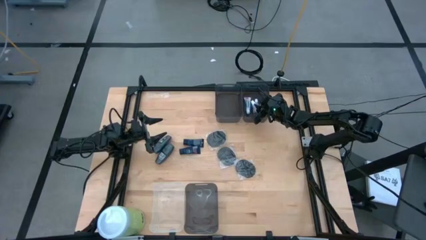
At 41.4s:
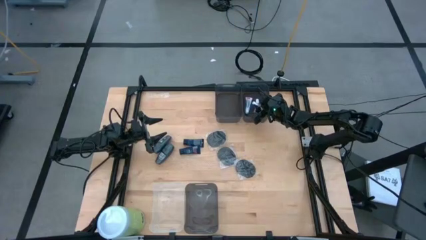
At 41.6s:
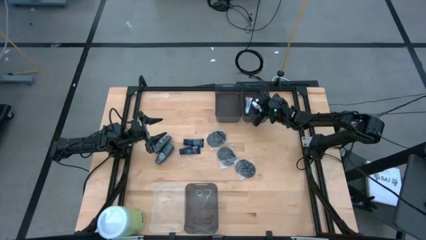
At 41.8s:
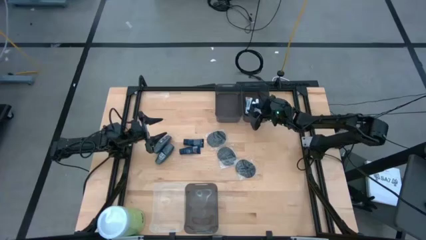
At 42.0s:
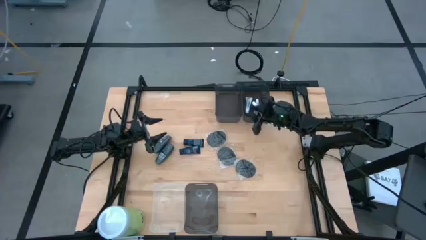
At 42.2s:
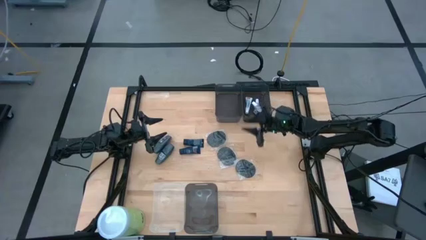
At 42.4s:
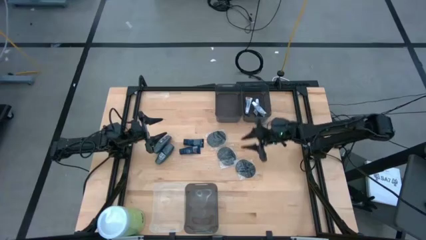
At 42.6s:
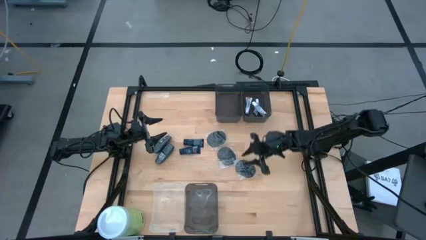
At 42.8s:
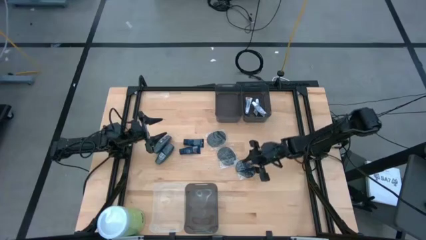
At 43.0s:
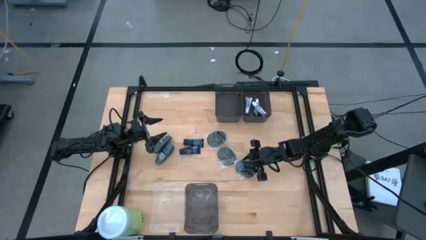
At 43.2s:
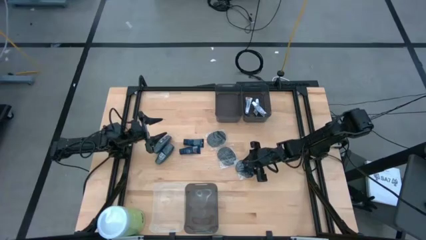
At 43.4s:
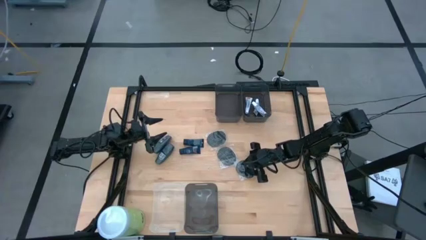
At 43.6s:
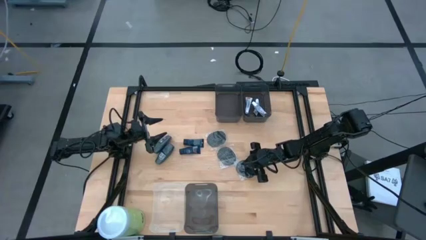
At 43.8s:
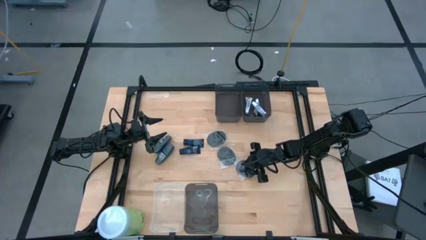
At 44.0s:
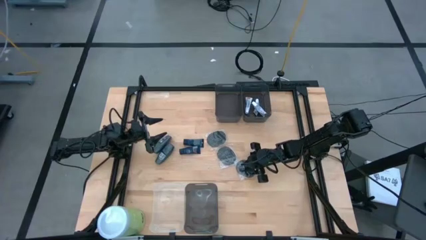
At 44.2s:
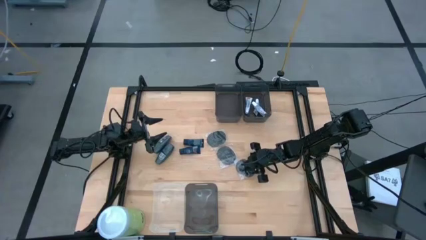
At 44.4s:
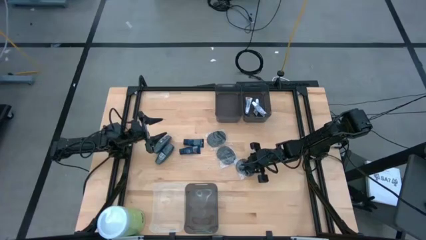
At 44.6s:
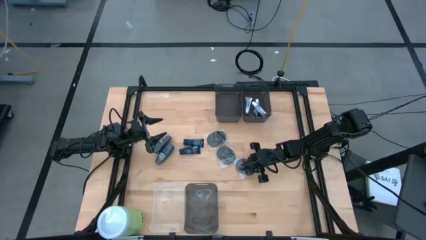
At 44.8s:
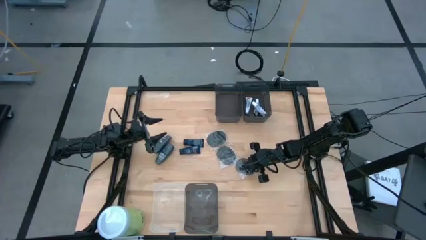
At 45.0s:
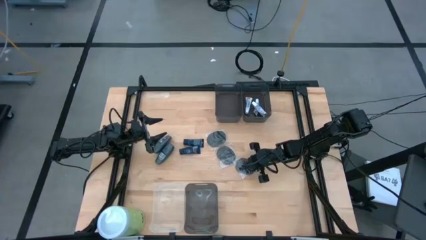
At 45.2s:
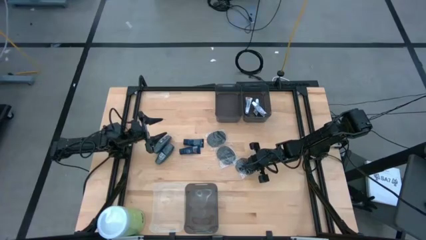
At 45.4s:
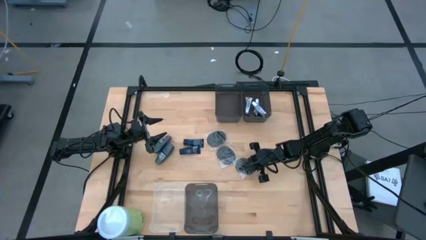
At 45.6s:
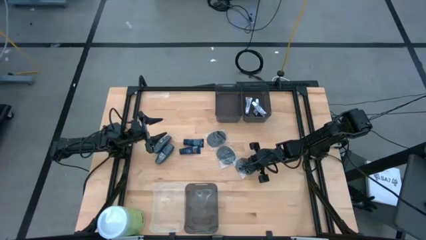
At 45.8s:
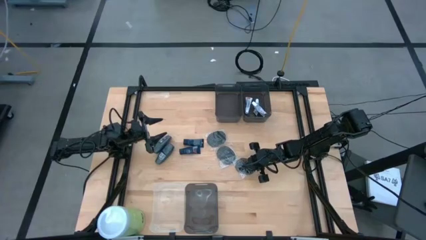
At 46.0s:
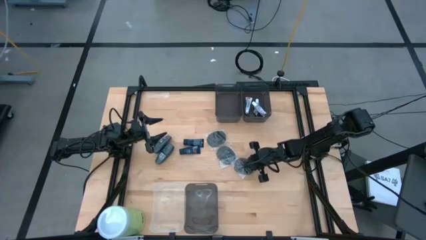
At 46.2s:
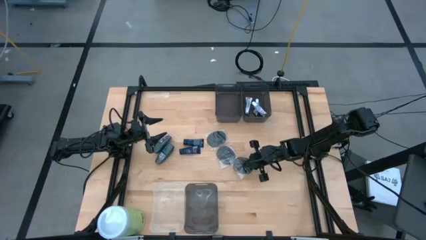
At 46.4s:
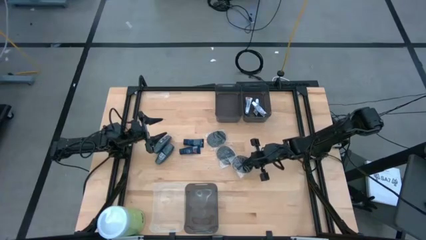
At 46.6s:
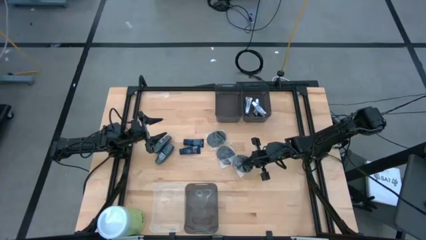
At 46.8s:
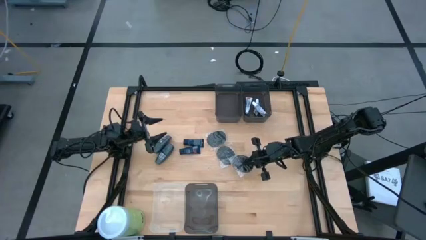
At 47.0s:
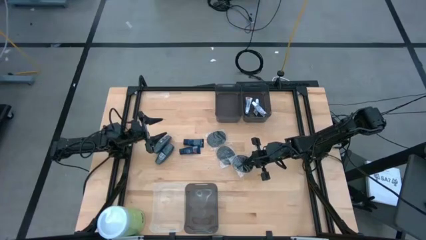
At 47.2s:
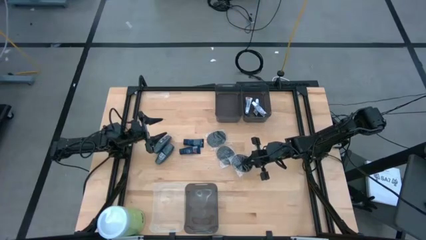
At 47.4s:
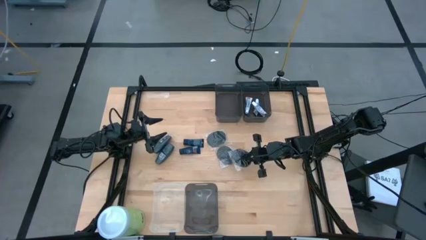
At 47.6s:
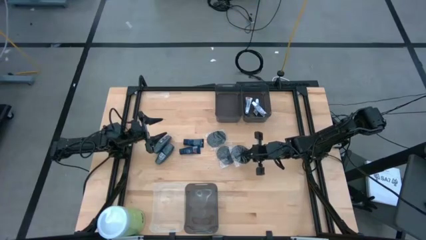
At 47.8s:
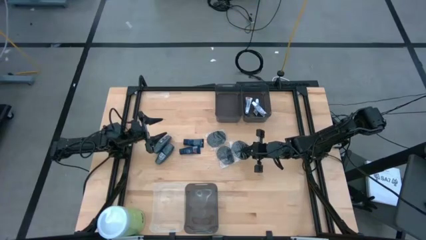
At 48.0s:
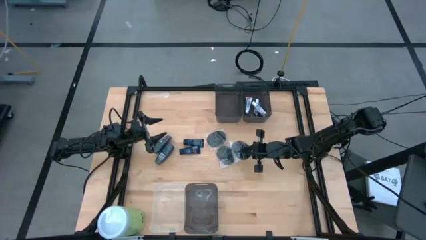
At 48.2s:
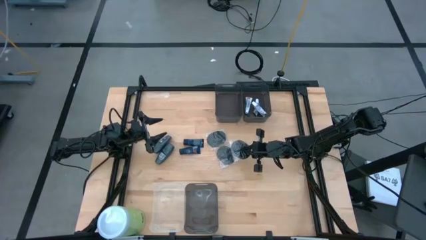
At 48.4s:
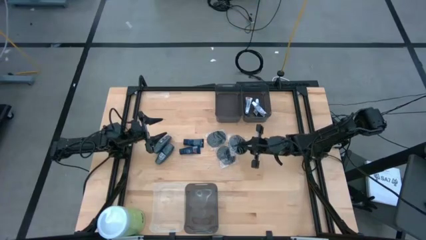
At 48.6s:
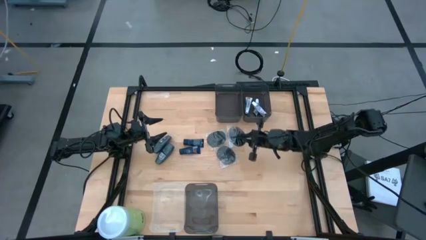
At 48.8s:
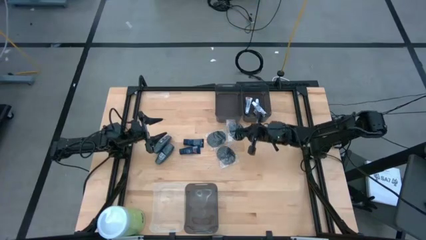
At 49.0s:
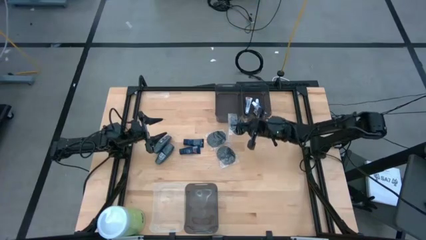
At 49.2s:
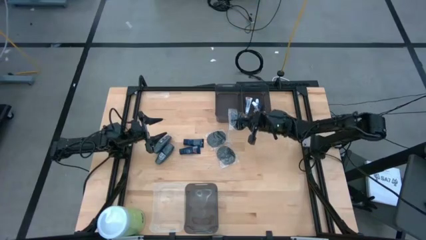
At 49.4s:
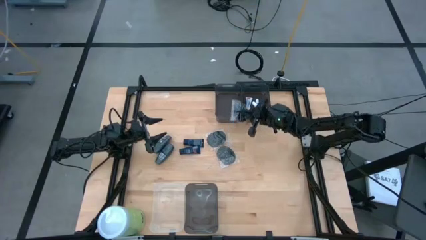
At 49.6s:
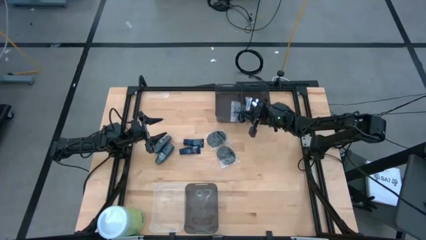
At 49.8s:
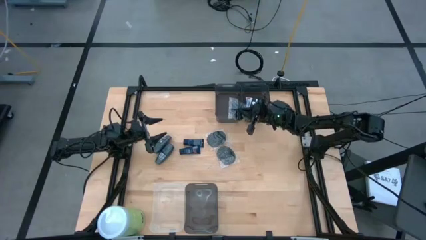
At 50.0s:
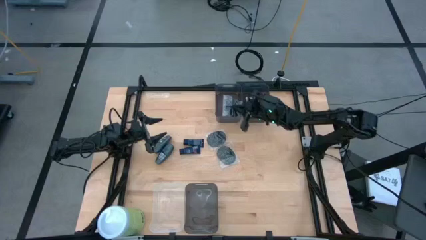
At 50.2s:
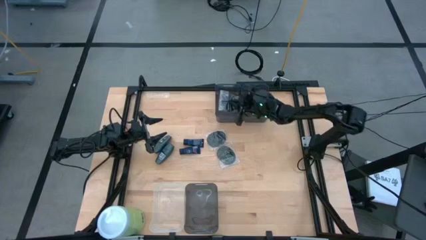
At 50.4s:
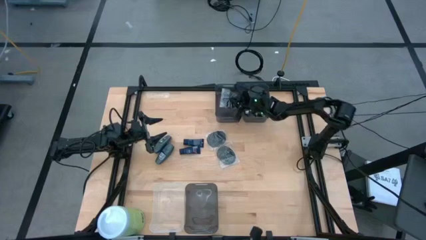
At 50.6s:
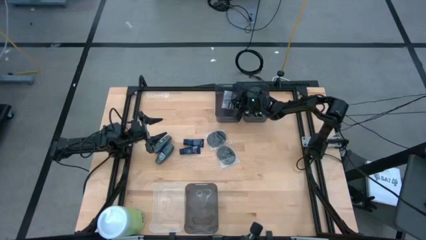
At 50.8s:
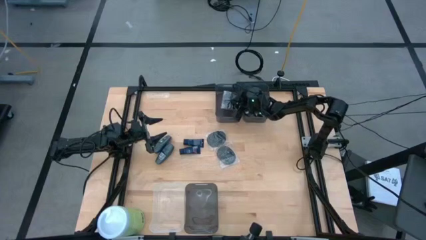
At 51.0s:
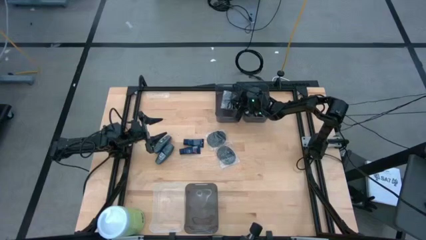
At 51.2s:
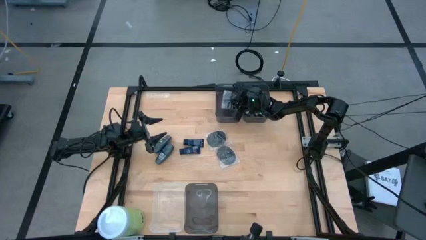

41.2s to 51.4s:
Task: Pick & Place Travel size toiletries
Put the bottom black hairbrush into the top left black bin

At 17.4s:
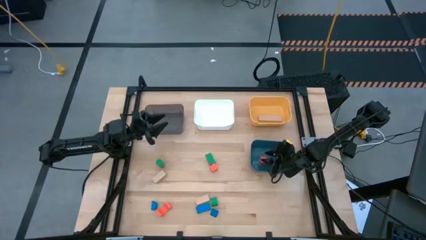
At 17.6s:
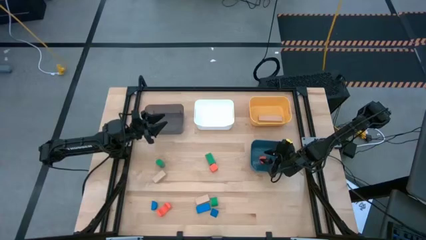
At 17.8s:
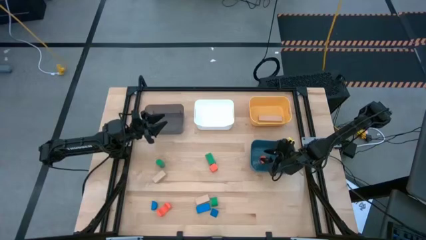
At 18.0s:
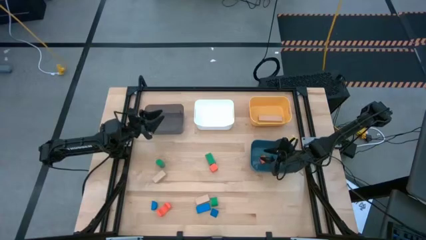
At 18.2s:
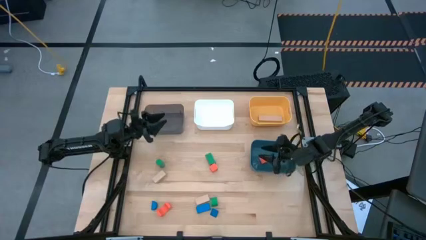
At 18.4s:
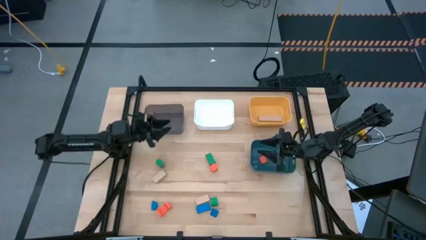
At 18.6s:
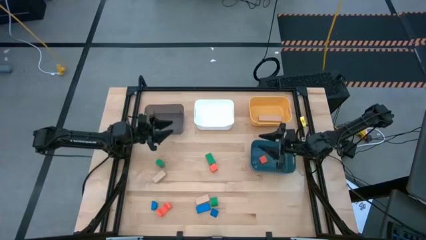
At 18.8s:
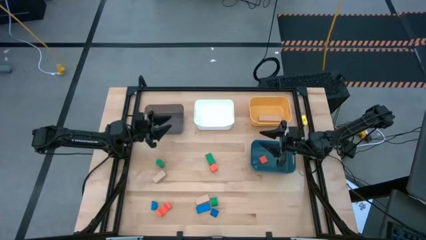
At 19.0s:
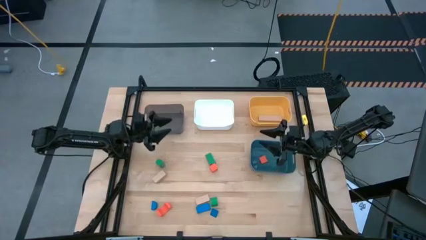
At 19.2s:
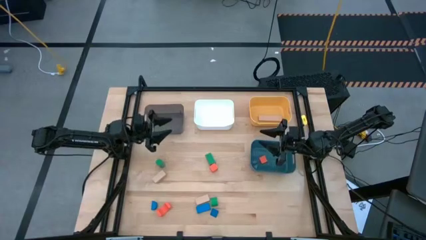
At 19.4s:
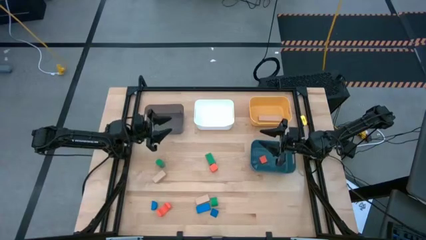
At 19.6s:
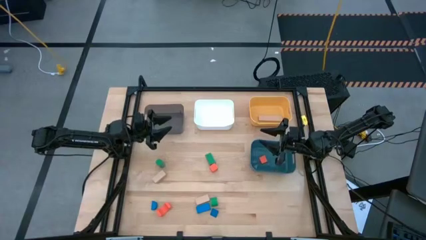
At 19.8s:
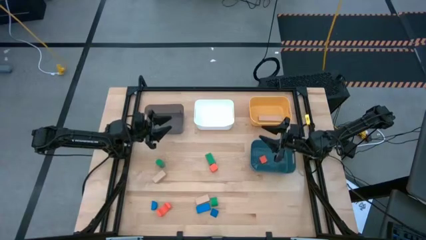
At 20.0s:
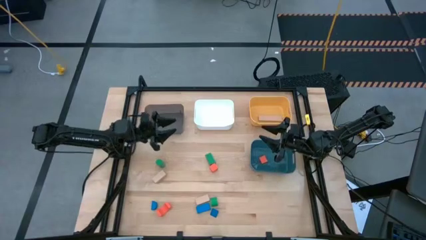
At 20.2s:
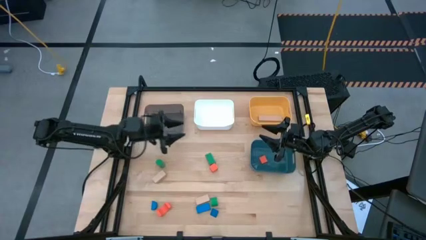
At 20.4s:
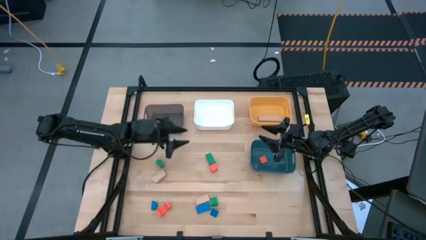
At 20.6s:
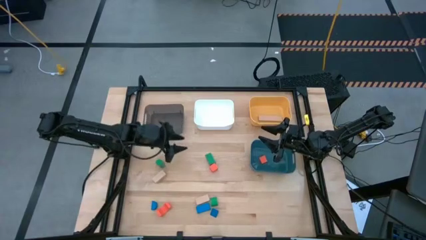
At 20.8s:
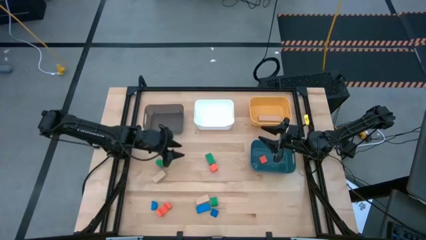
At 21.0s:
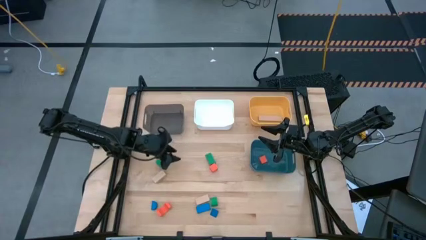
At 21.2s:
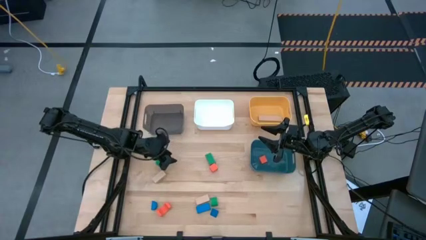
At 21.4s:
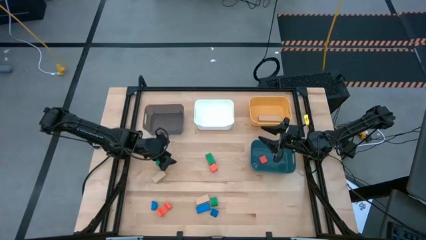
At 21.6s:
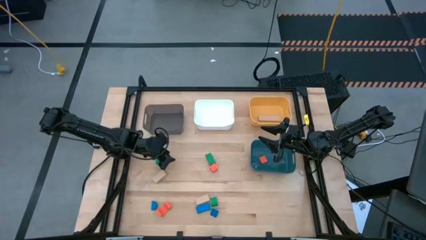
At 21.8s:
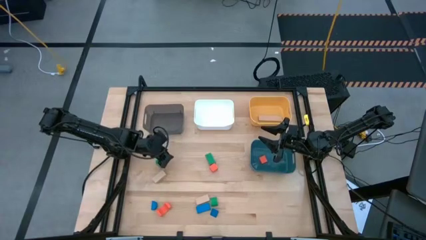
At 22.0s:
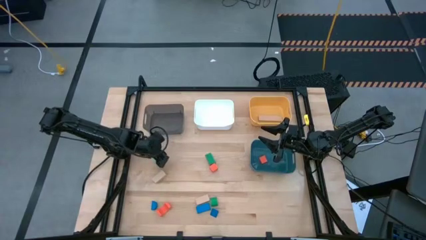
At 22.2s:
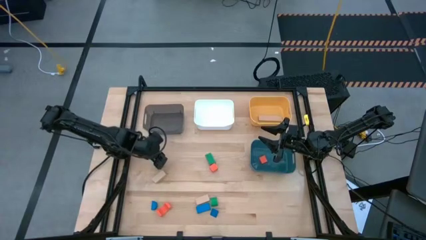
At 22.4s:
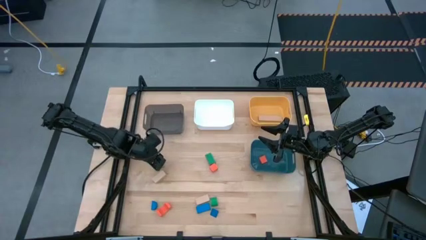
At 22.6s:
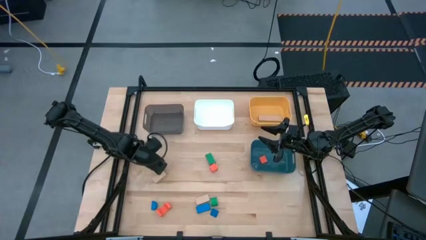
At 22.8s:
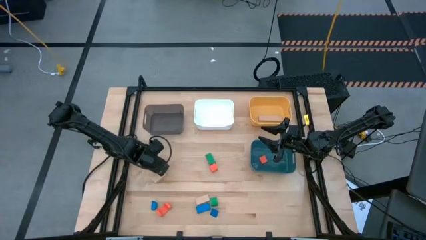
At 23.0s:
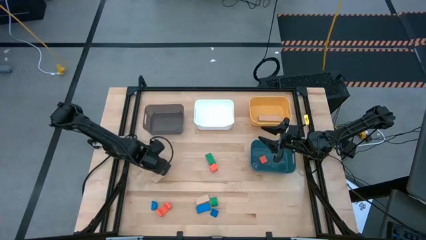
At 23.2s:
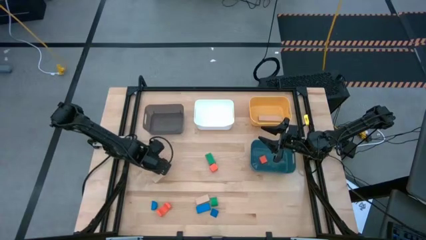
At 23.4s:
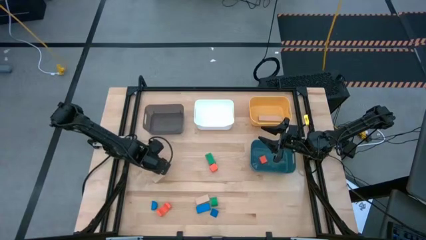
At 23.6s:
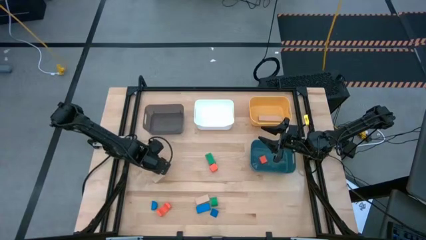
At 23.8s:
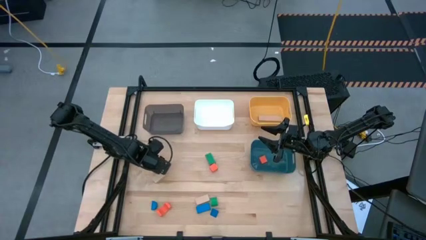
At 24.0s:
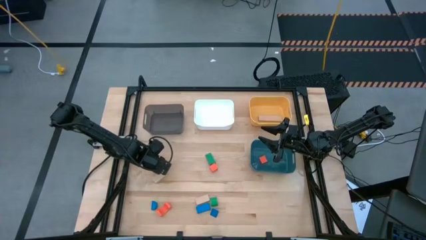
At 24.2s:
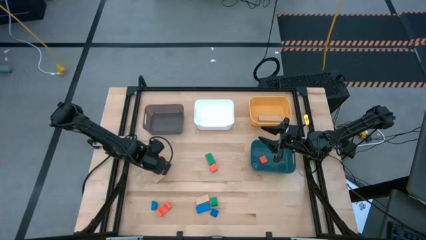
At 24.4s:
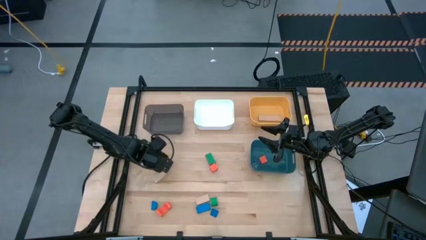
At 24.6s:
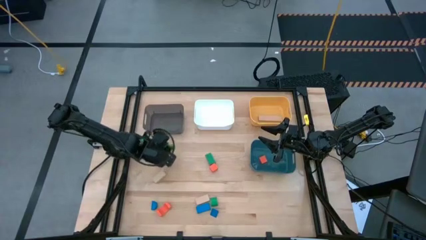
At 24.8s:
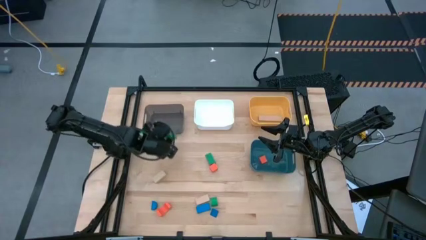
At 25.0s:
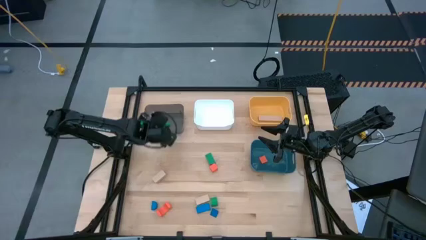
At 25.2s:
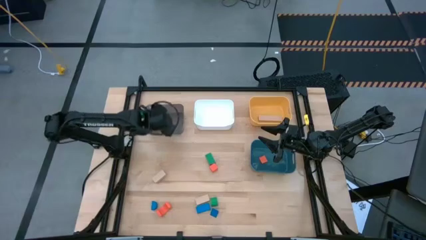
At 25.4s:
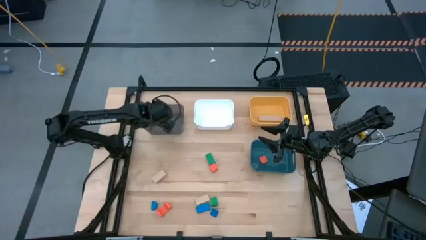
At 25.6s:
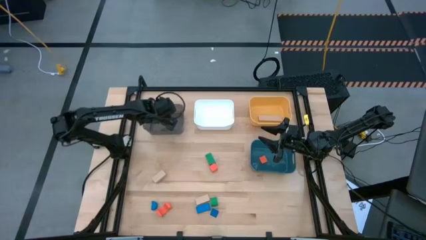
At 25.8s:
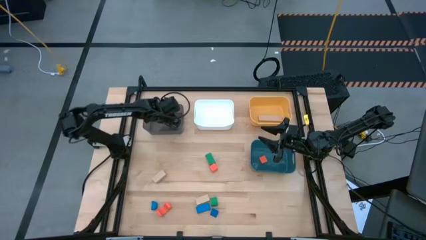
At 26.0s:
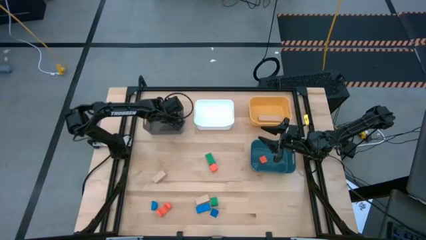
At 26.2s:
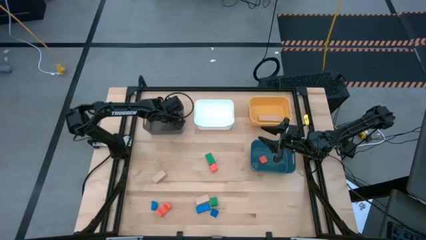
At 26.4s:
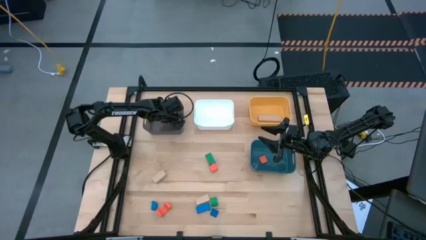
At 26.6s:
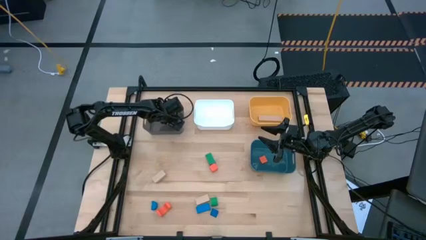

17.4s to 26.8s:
Task: Sort & place blocks by color
Put the top left green block into the black bin
